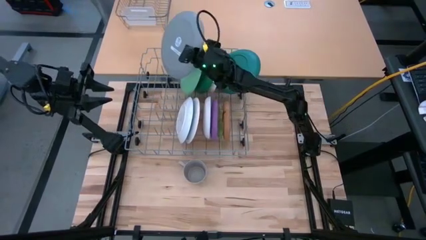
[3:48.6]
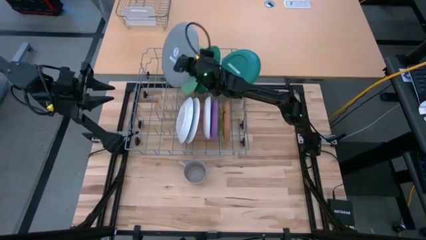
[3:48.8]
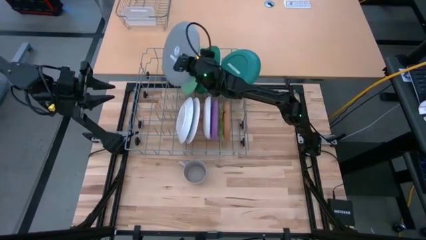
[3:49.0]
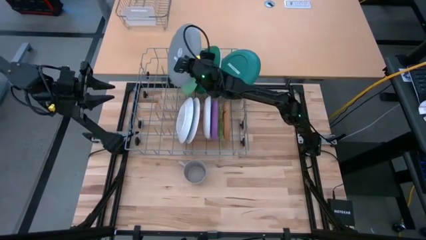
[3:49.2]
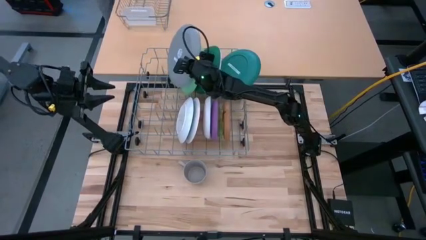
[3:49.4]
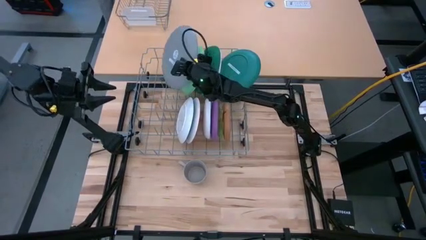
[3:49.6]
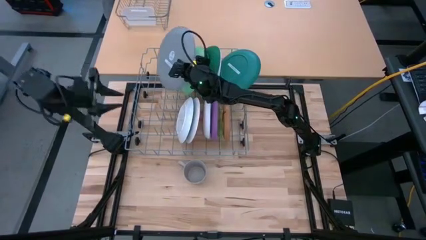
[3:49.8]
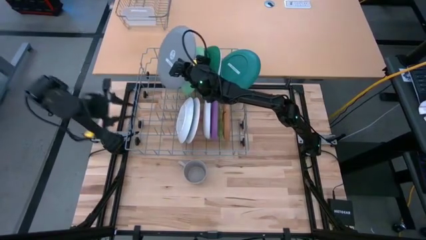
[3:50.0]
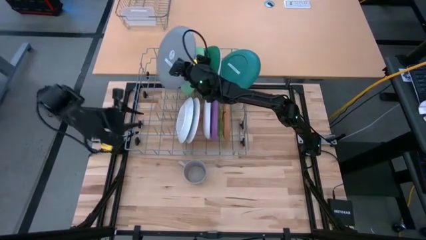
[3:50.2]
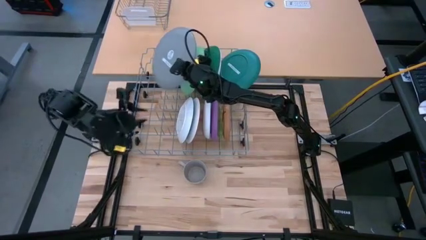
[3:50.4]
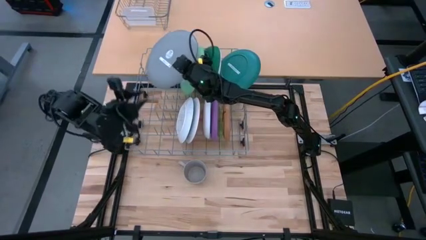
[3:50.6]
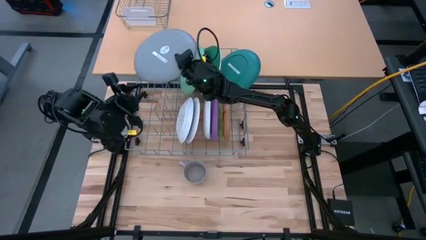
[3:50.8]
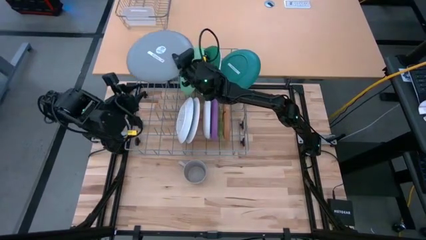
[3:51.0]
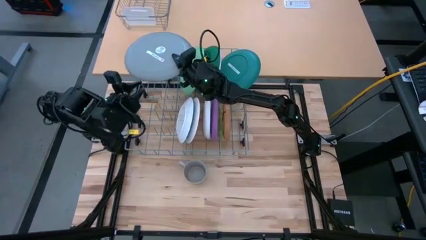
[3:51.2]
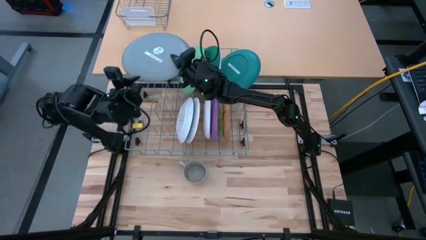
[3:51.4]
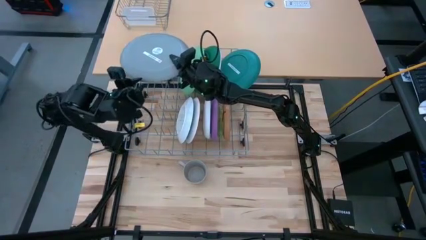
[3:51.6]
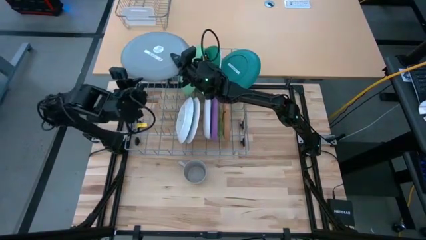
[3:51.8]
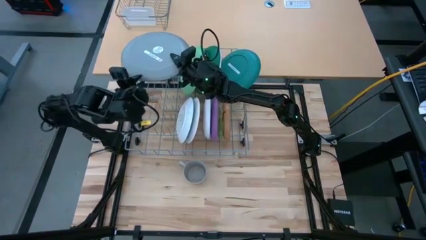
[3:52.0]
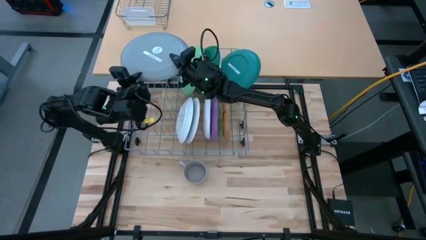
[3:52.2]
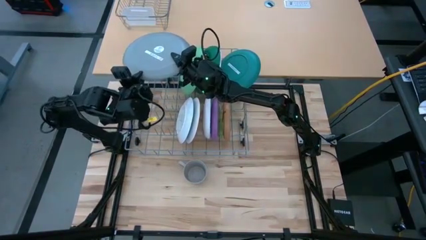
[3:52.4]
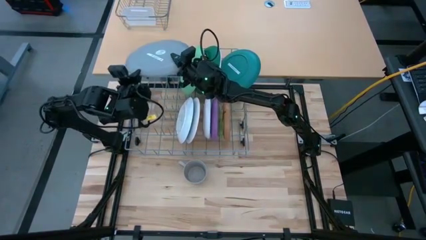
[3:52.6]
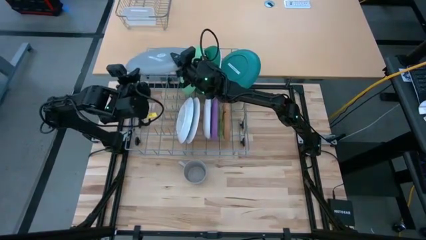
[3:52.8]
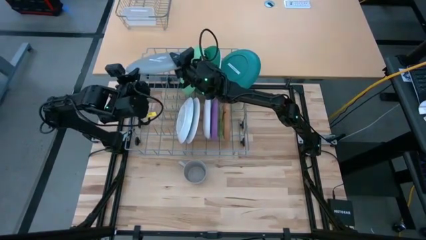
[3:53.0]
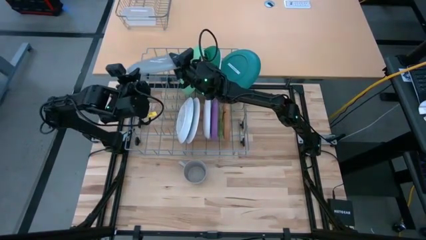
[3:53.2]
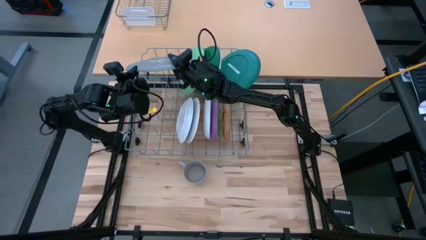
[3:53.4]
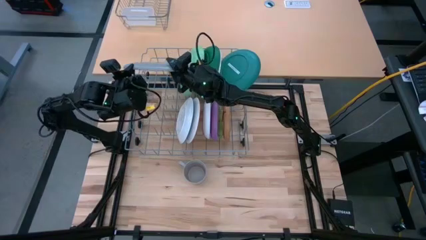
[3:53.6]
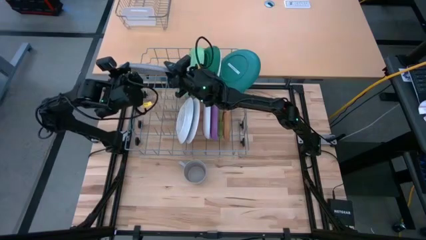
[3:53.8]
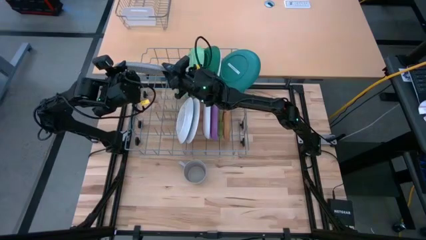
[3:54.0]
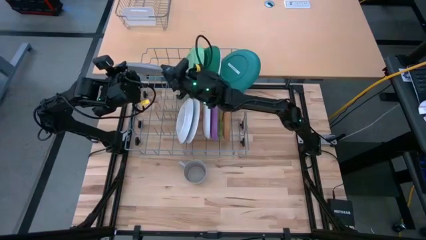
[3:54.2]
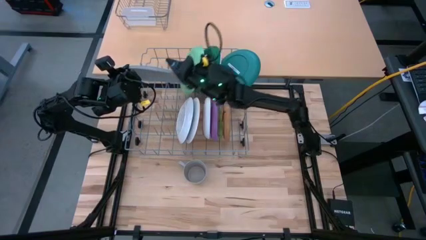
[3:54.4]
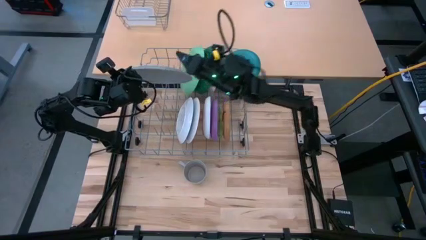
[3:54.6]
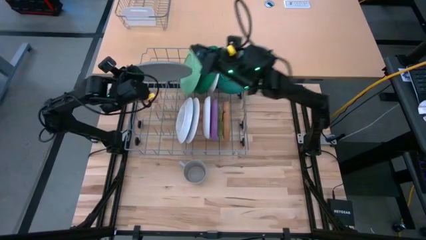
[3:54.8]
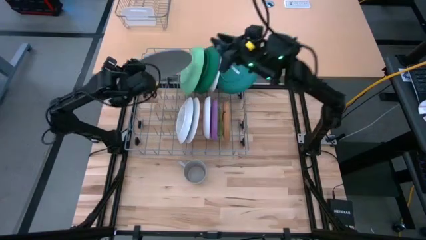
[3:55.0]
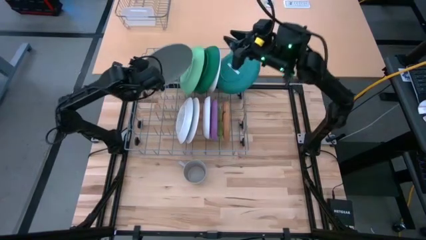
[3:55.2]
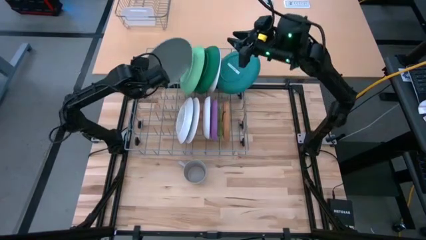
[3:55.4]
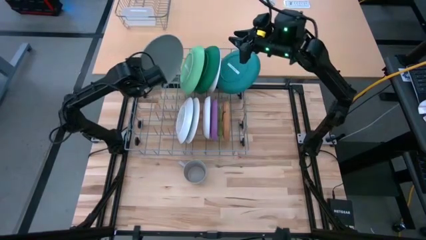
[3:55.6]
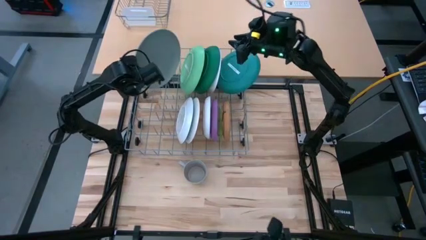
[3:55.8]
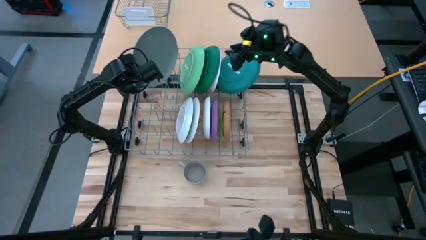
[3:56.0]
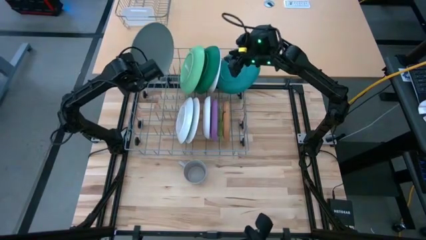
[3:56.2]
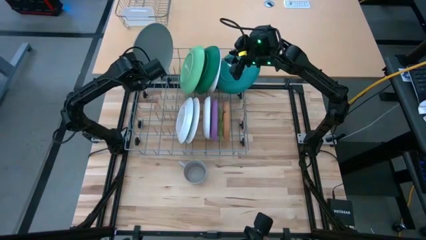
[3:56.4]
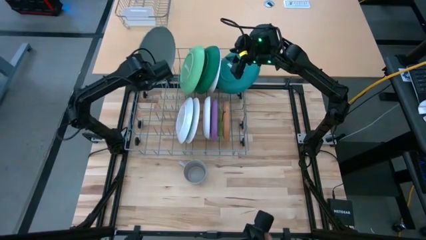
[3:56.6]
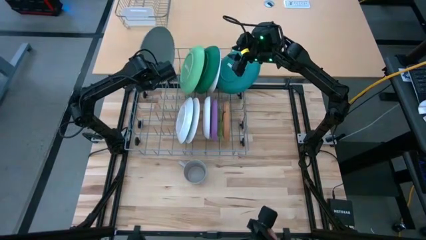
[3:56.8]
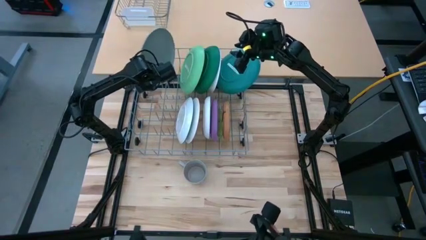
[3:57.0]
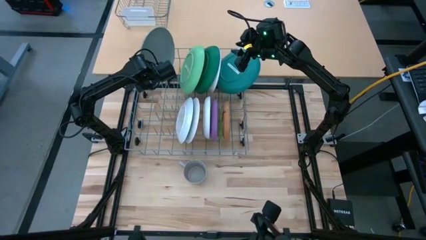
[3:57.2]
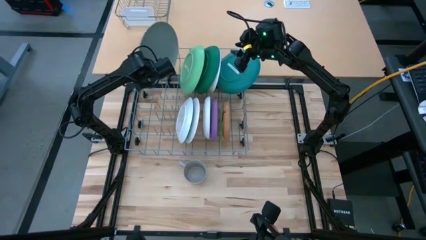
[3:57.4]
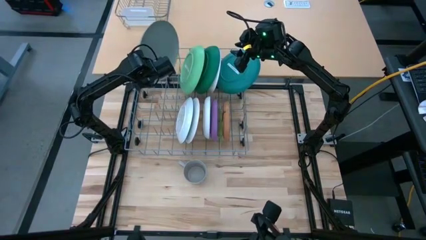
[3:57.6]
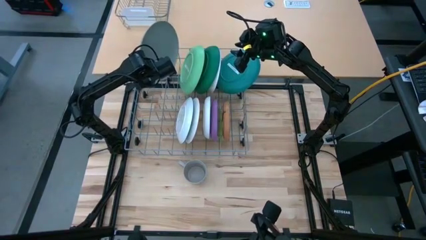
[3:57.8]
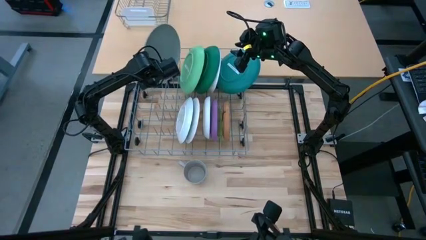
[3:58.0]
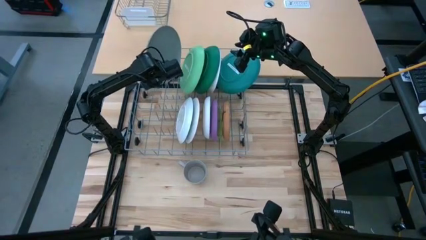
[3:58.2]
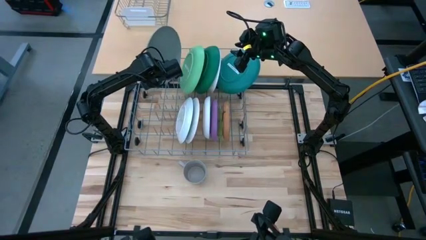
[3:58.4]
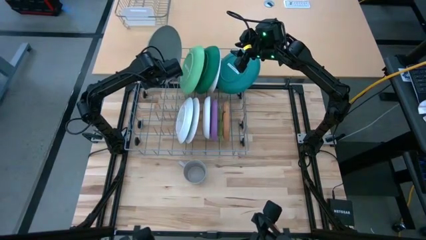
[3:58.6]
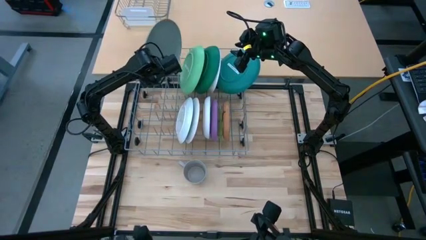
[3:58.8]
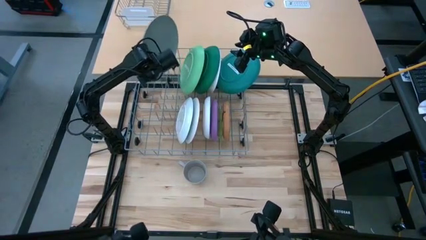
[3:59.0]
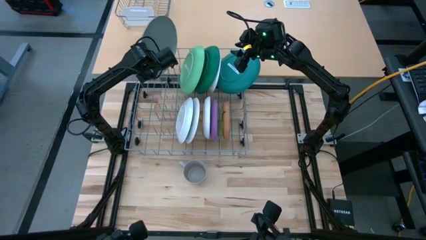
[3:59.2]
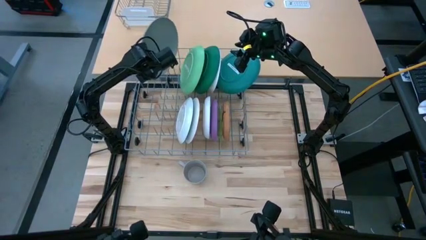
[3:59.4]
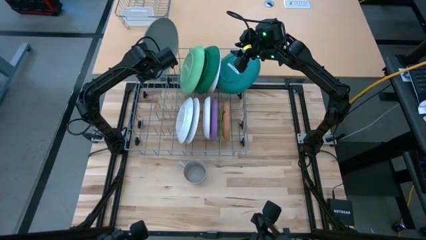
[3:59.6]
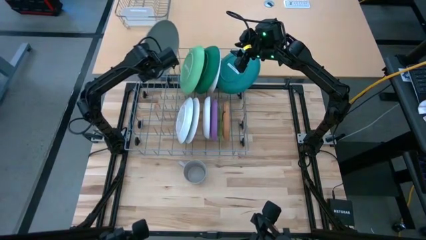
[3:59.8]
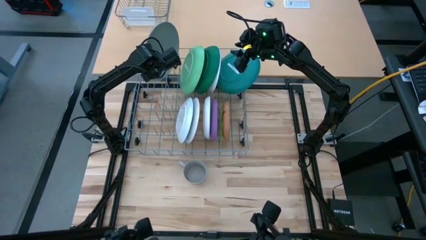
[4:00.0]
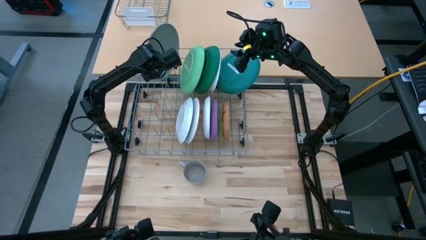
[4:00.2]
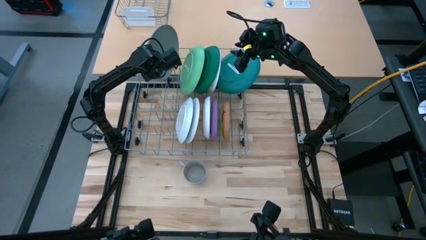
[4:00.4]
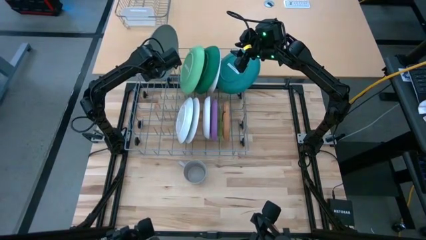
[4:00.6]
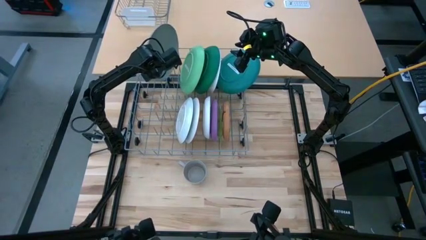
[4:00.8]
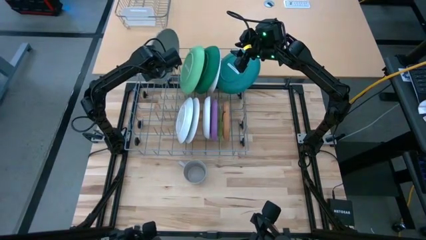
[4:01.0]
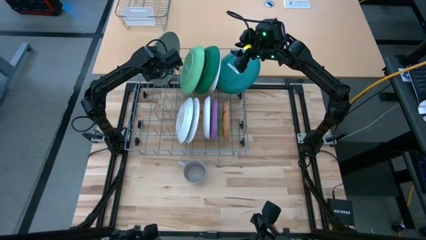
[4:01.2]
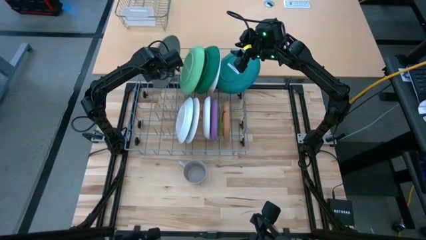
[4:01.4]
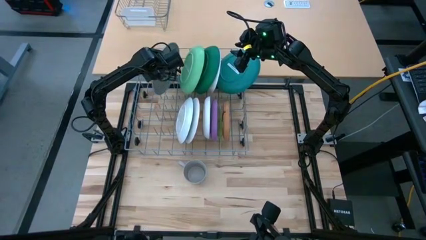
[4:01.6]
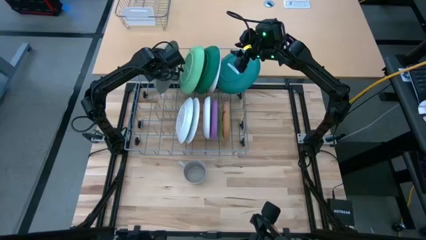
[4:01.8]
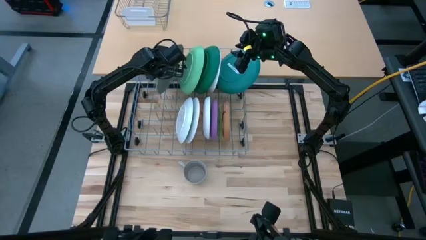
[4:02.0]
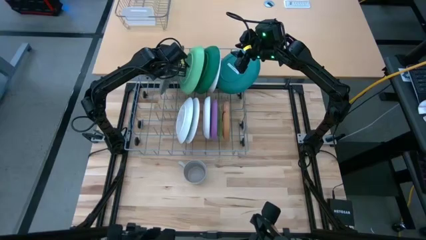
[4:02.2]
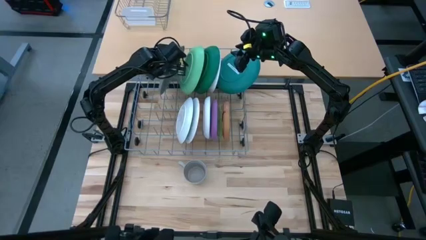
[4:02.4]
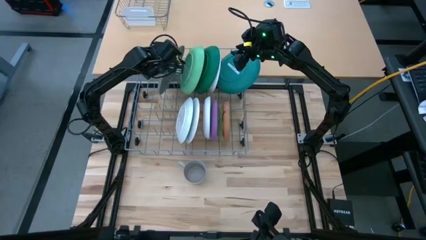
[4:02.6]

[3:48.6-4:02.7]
Task: Sort dishes
Put the gray plate in the dish rack

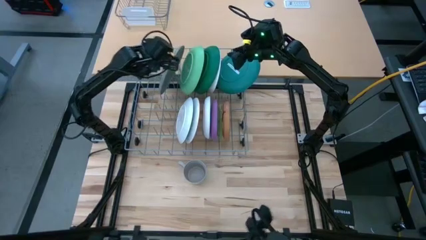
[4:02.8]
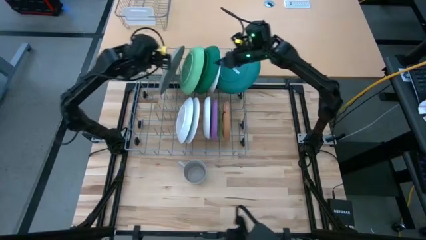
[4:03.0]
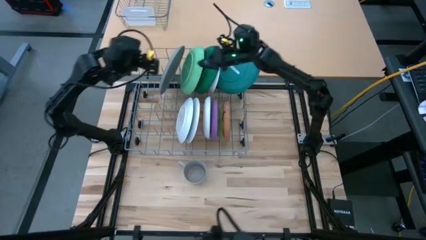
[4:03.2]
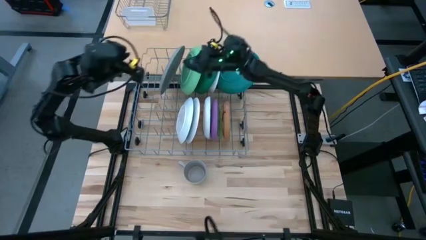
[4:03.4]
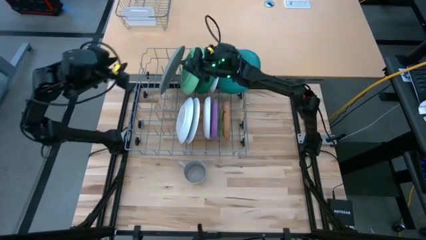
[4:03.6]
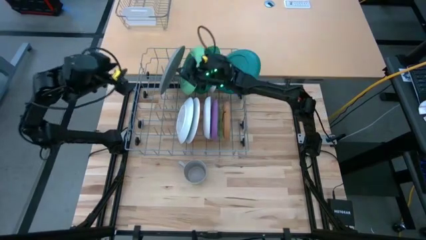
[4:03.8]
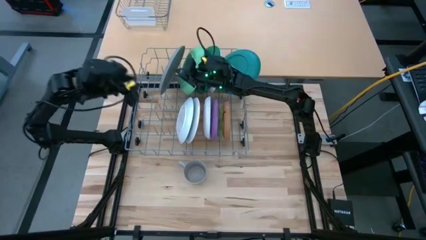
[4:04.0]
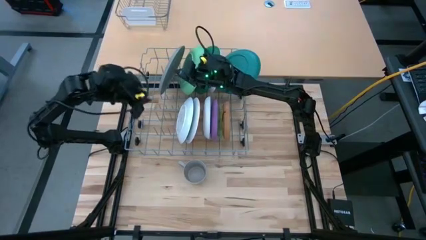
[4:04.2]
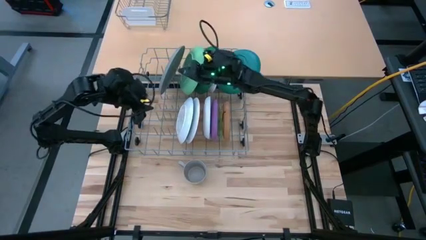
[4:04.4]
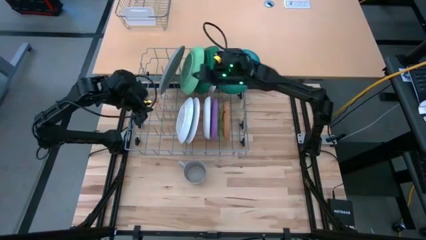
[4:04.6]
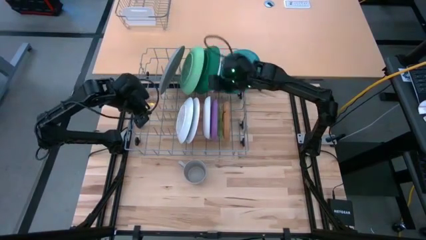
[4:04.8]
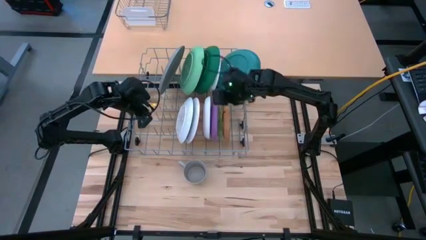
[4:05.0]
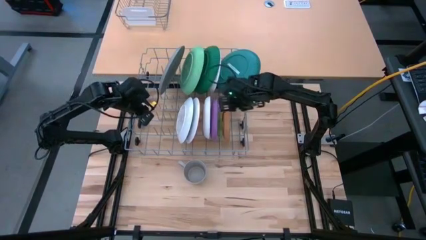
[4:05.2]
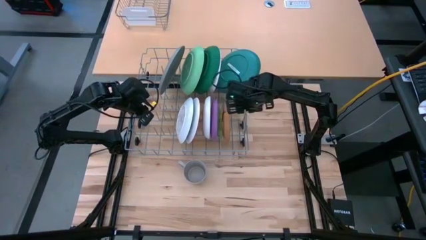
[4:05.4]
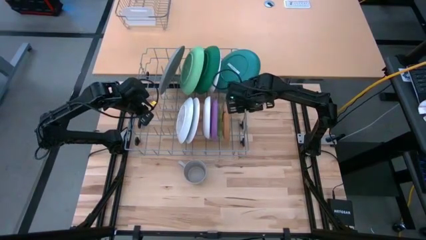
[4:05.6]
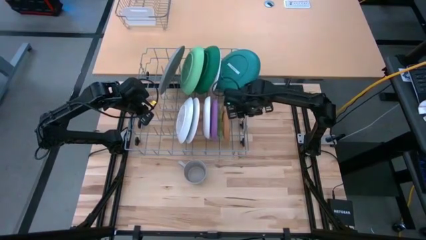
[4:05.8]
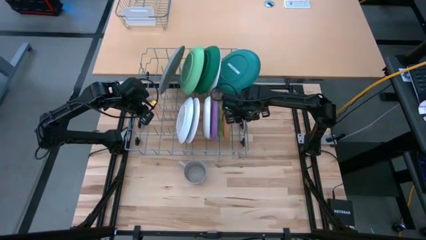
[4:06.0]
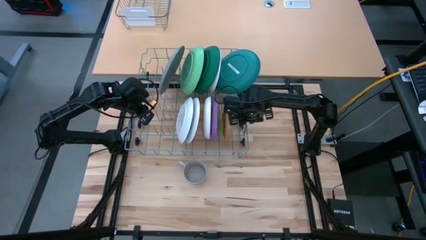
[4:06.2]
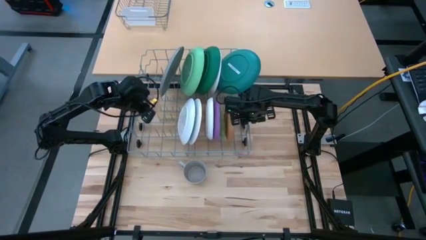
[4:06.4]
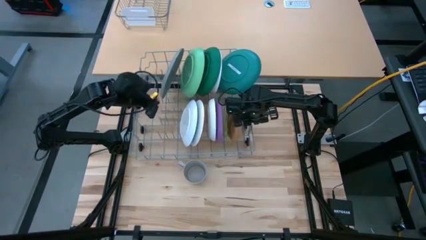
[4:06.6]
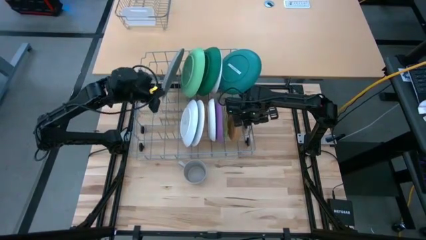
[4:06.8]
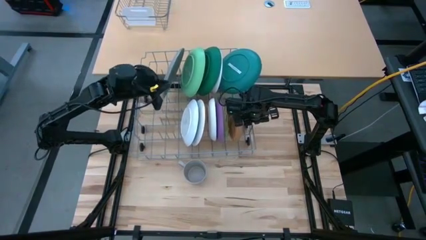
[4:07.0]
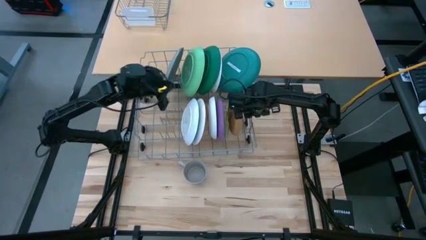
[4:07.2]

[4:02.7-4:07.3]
Adjust the dish rack
